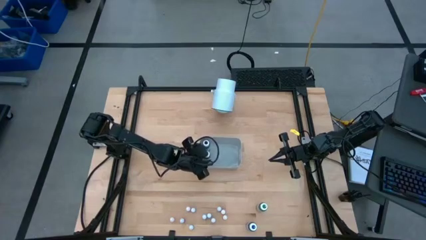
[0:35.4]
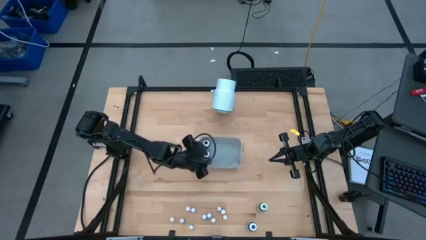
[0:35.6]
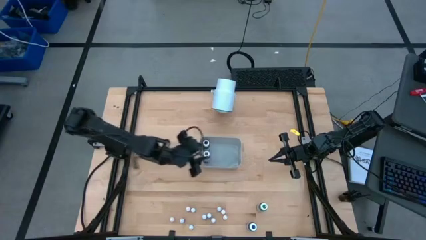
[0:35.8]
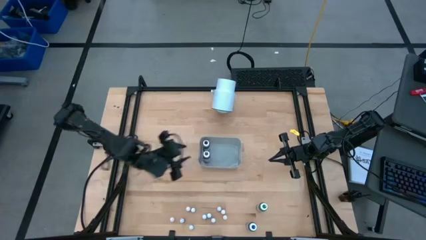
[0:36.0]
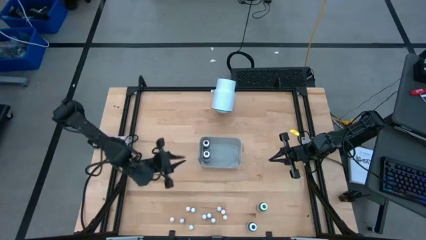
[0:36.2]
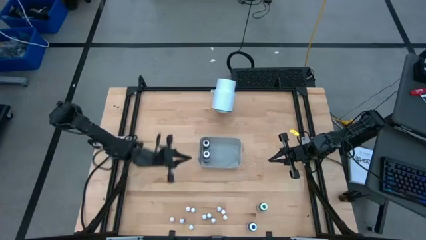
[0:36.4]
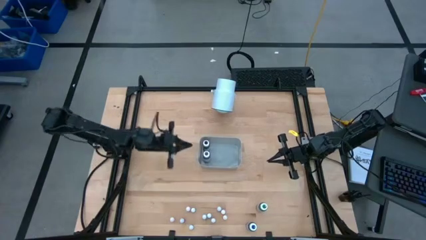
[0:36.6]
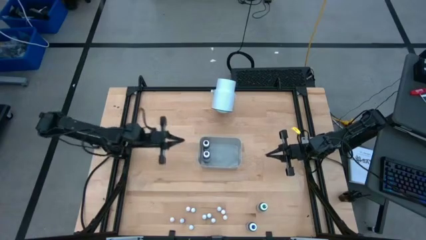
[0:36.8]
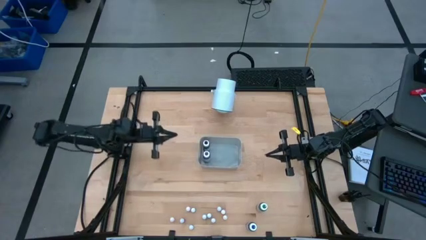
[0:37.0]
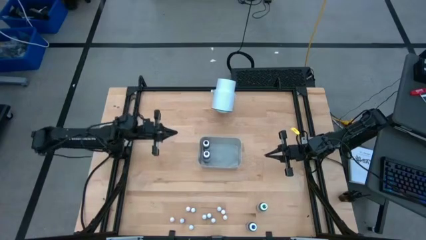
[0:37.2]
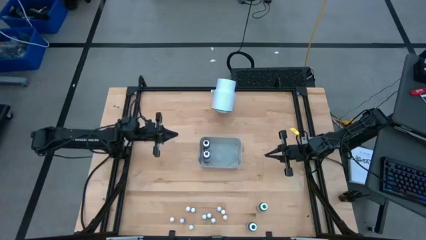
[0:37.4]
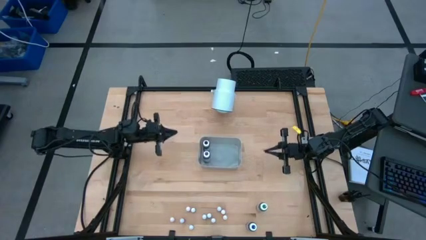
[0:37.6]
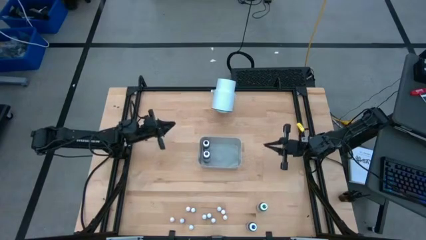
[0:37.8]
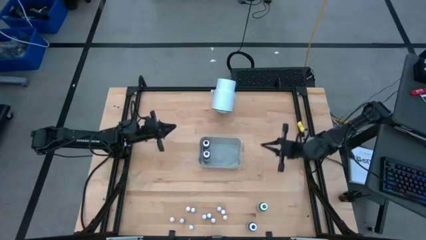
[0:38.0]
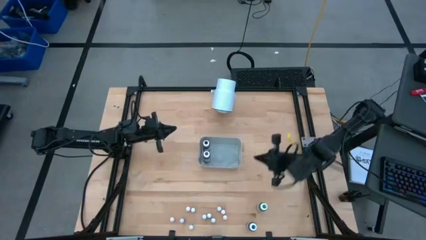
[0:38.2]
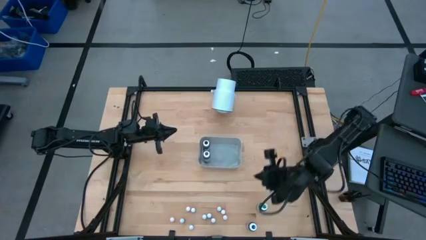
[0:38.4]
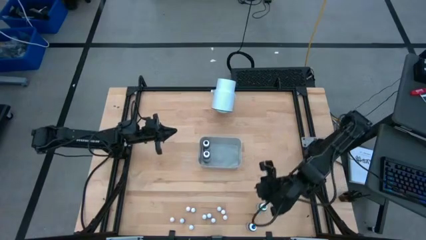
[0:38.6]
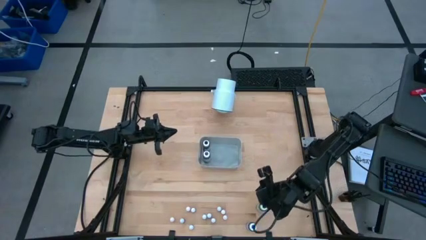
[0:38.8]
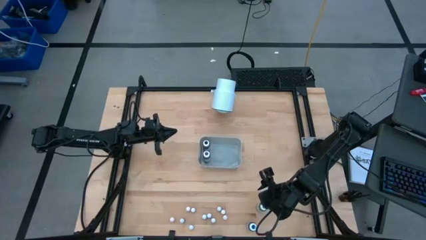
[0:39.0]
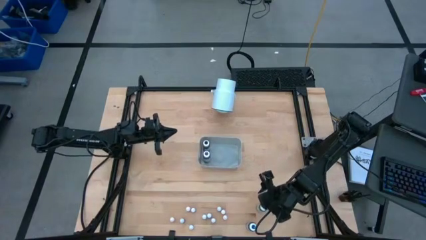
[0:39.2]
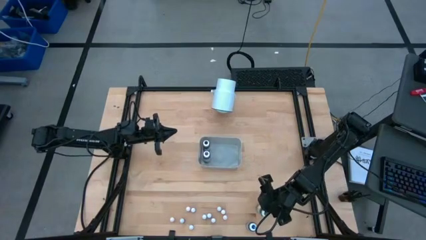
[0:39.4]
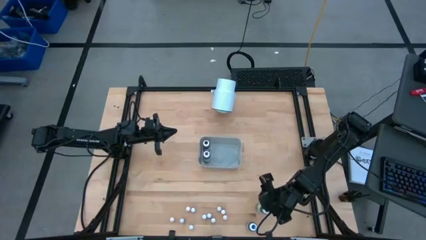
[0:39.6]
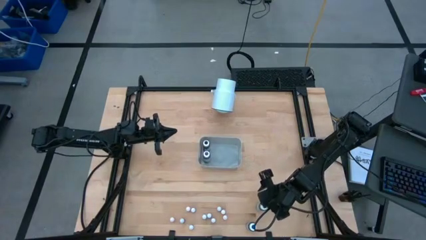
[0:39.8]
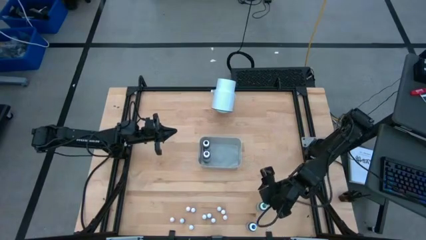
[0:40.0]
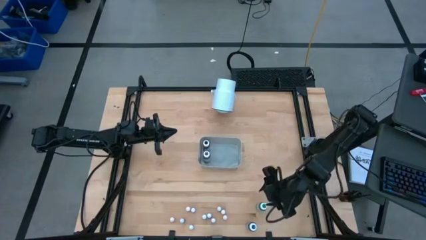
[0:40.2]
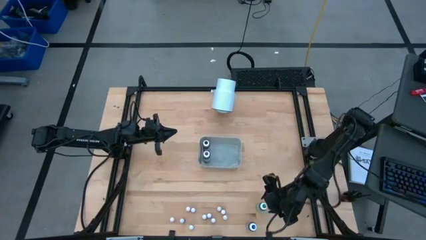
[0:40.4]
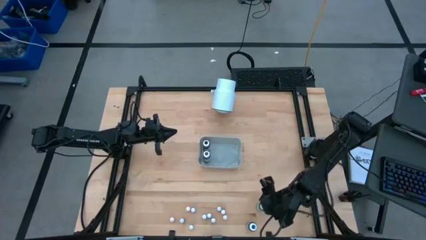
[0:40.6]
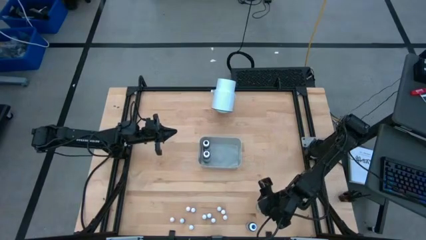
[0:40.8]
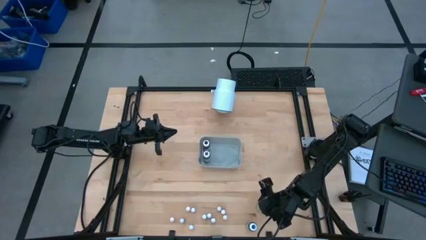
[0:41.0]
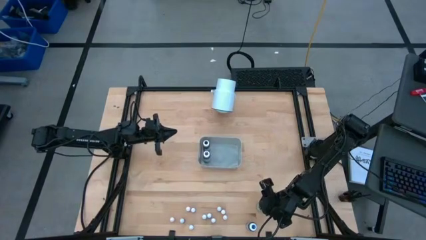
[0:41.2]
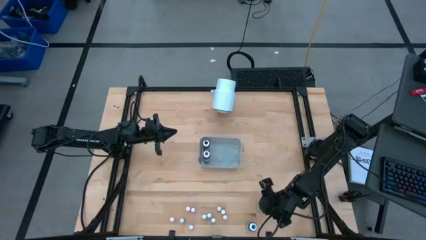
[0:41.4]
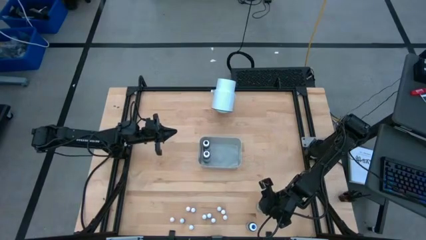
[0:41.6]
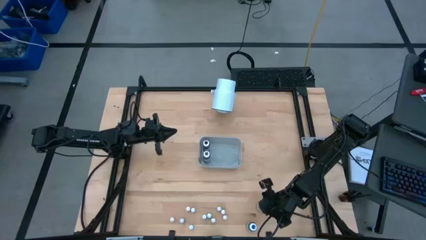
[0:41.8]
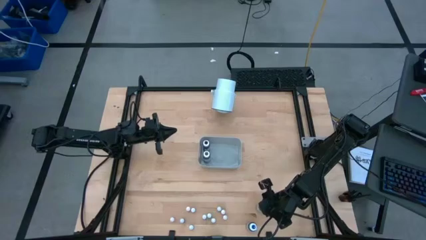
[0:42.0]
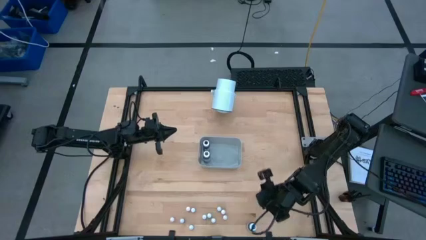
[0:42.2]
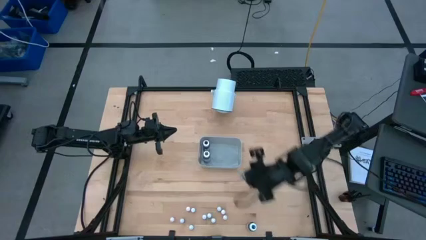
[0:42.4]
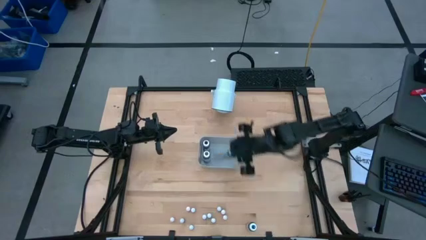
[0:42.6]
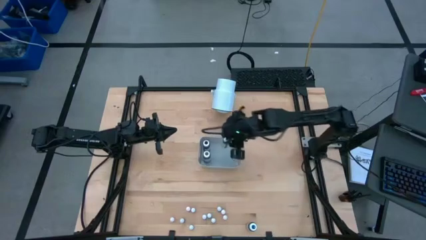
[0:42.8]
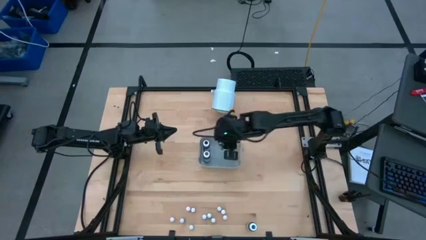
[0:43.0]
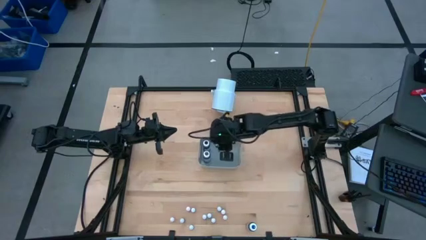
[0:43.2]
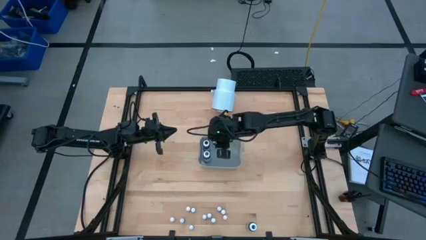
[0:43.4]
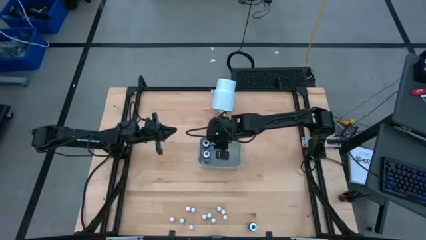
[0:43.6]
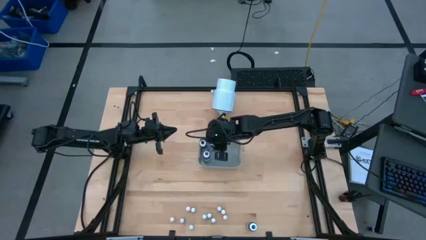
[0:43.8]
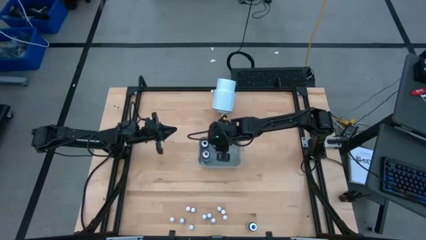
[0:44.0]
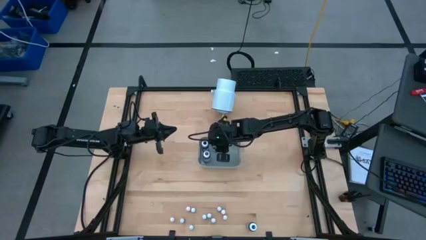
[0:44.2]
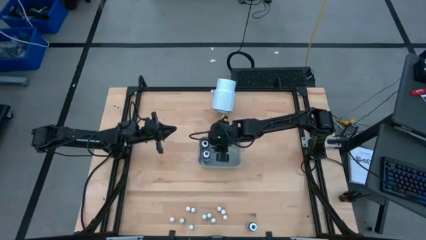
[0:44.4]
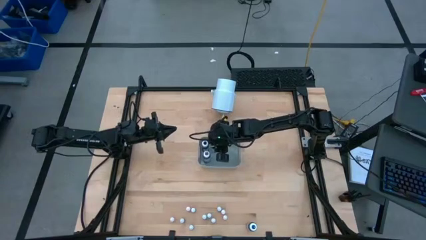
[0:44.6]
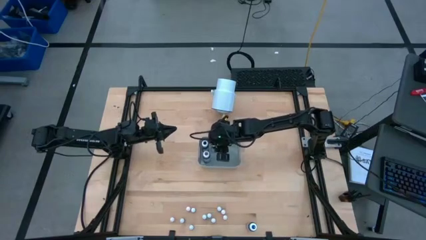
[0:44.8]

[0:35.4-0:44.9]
Task: Pick & Place food coloring
Put the large green food coloring bottle into the gray bin

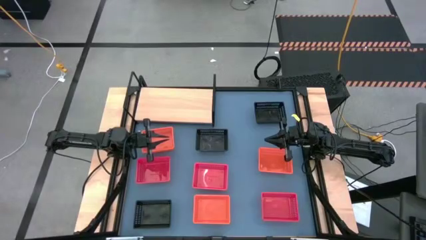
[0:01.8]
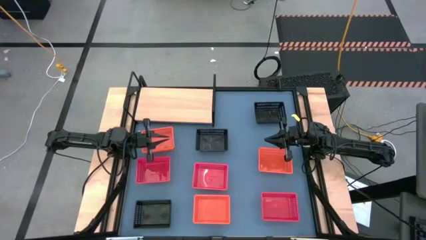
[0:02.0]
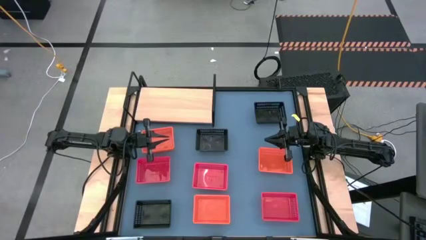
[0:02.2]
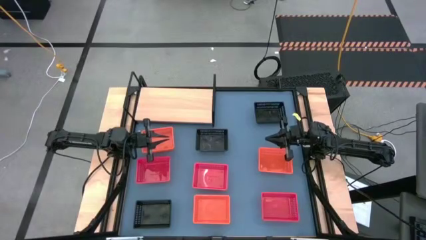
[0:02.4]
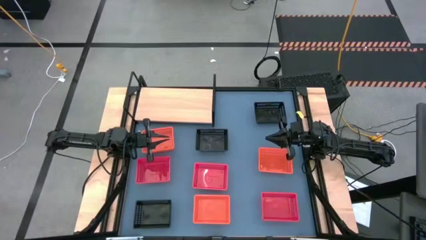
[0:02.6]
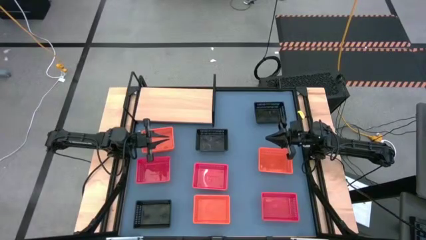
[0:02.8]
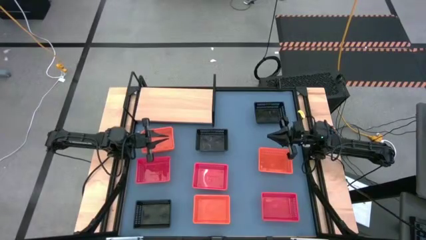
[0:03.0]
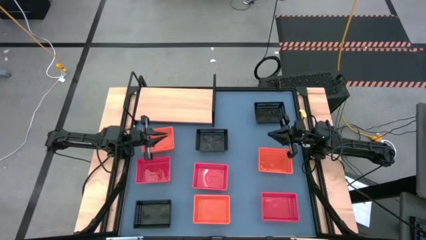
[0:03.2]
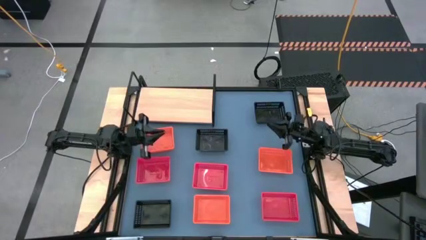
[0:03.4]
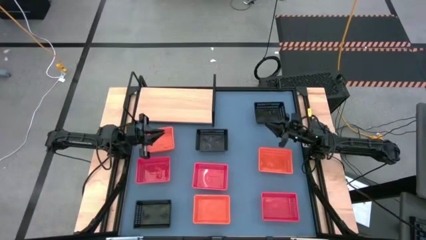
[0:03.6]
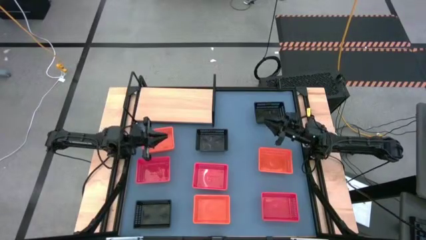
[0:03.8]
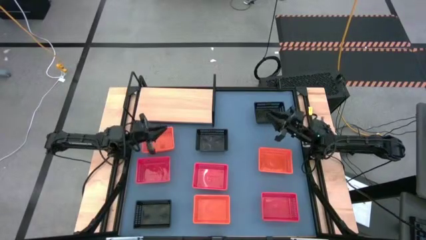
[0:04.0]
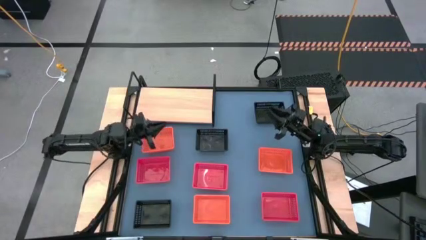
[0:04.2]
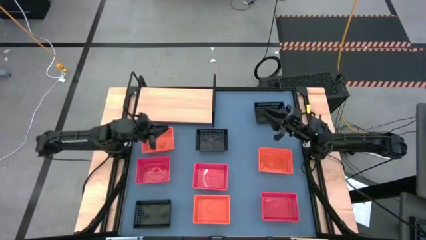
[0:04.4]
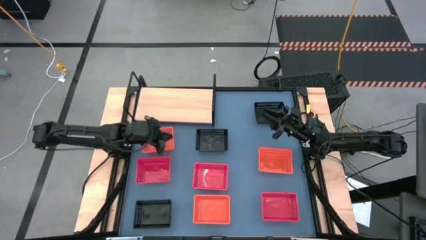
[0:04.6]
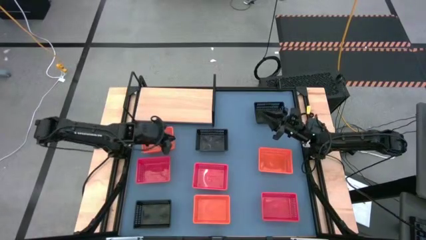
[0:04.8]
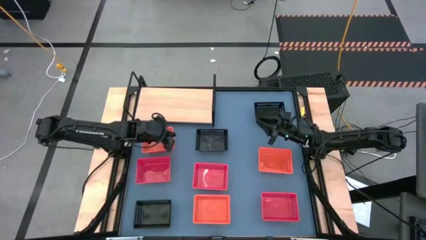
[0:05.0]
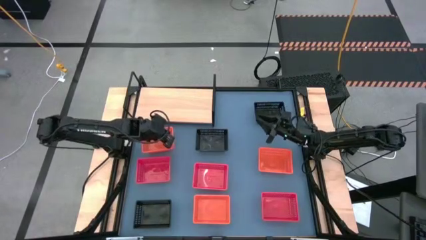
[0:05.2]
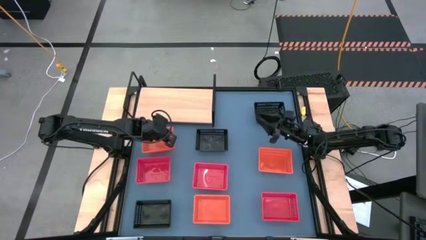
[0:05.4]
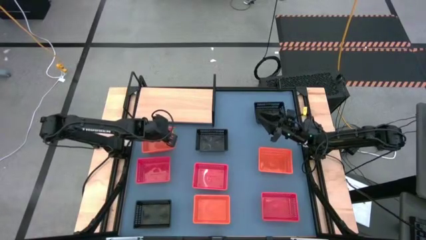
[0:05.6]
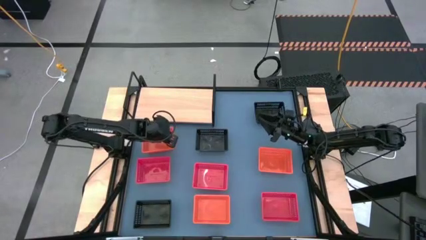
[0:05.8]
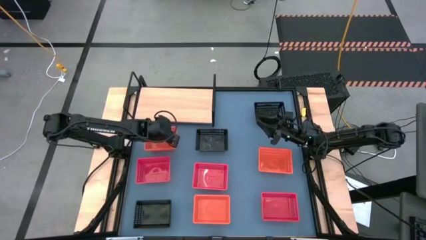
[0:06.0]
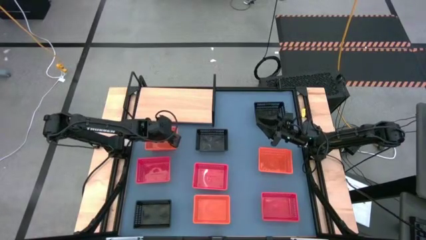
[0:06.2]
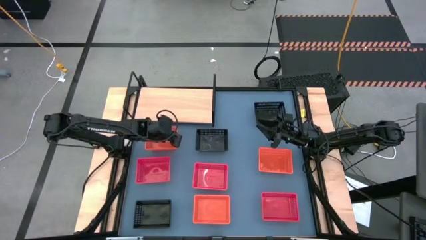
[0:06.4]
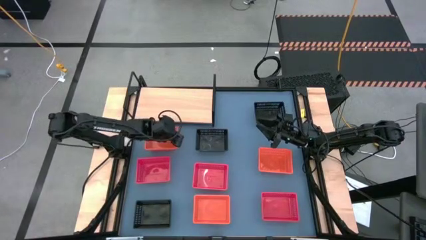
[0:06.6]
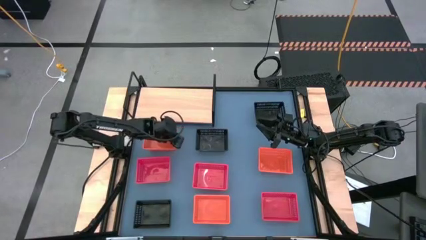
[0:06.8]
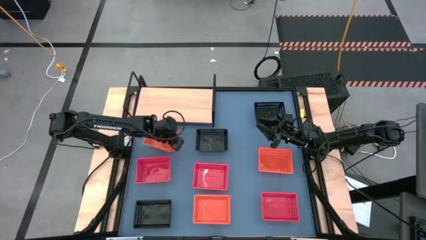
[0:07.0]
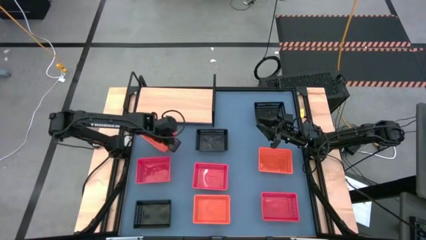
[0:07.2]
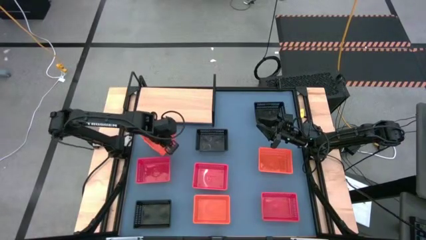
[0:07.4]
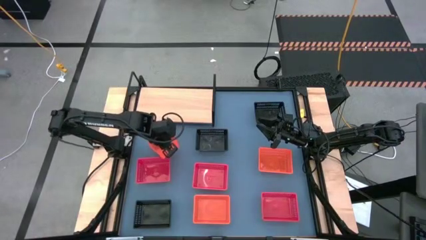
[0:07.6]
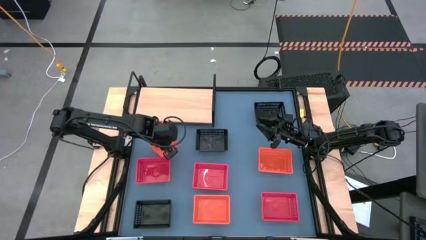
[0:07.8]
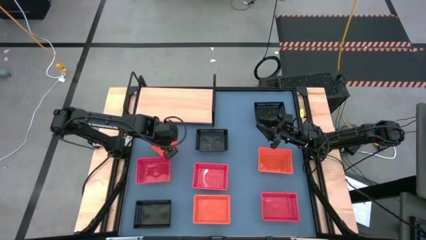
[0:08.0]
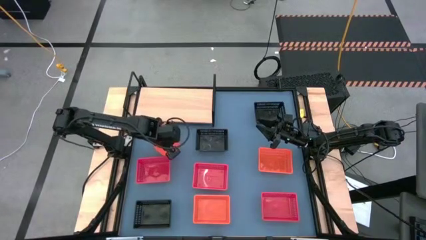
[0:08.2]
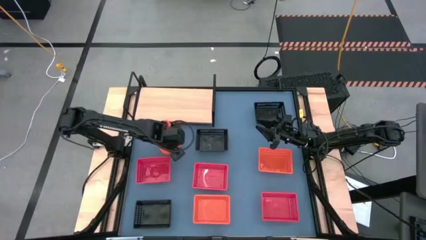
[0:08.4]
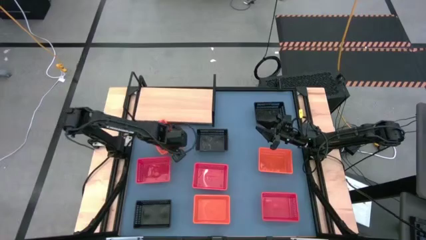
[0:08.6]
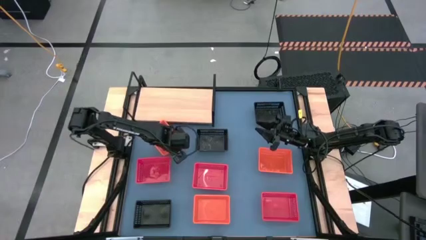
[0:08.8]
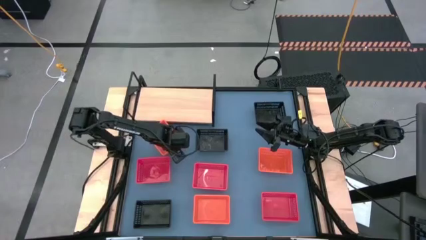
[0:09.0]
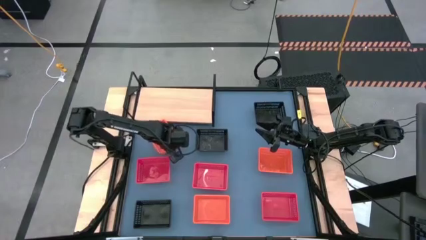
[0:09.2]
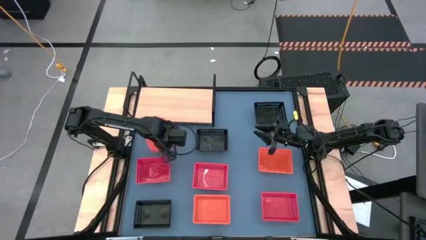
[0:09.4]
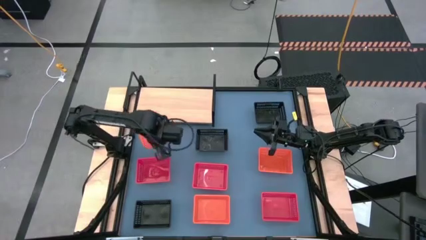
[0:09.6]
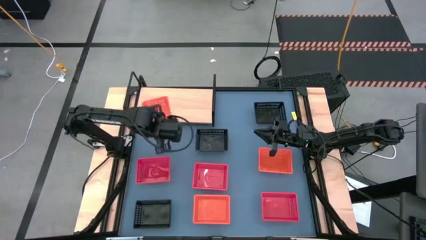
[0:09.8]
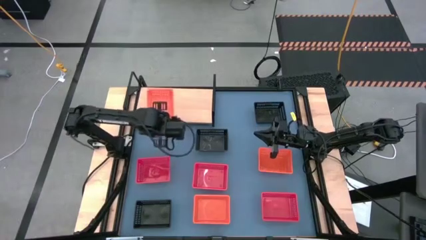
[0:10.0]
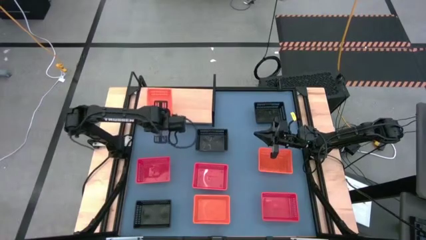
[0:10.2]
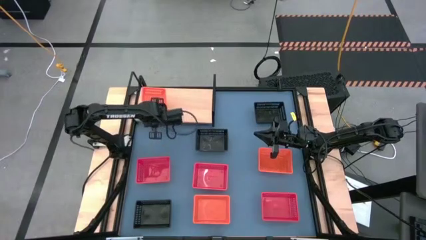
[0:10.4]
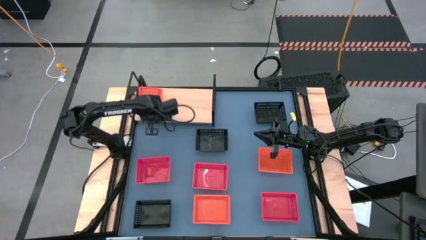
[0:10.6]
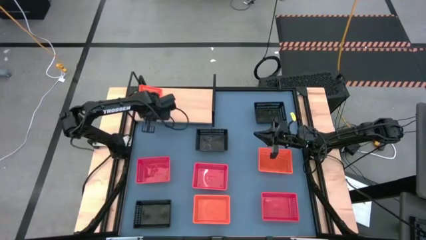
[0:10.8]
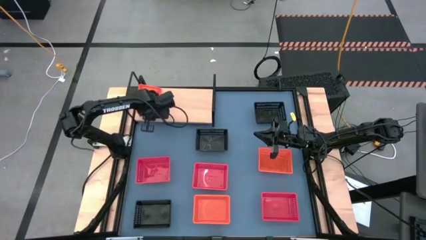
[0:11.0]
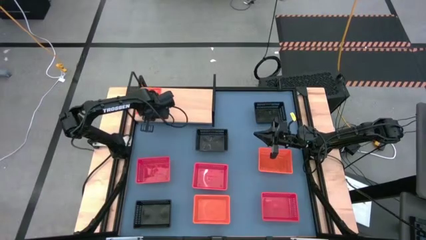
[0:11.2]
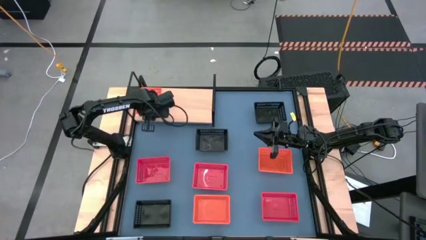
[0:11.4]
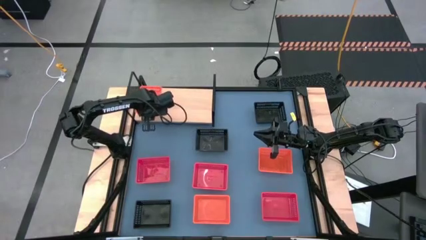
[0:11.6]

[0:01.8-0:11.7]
Task: Stack baskets on shelf by color
Put the top left orange bin on the shelf
